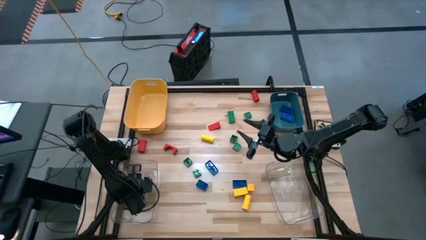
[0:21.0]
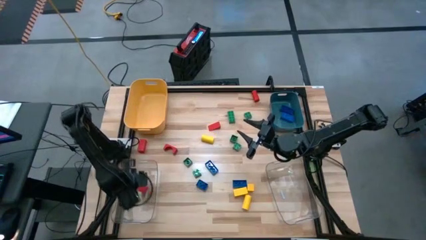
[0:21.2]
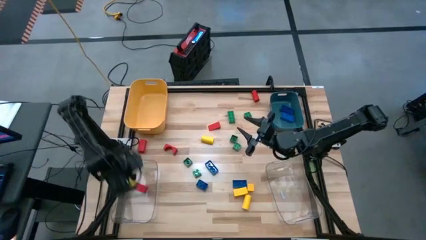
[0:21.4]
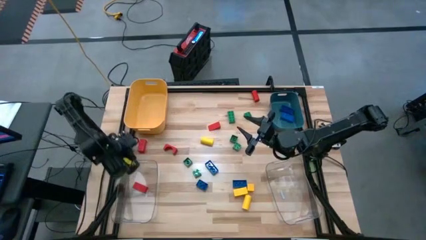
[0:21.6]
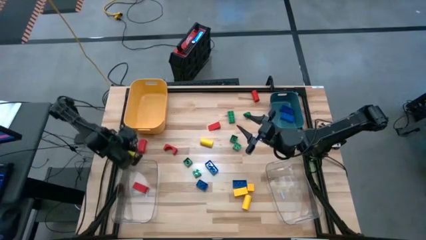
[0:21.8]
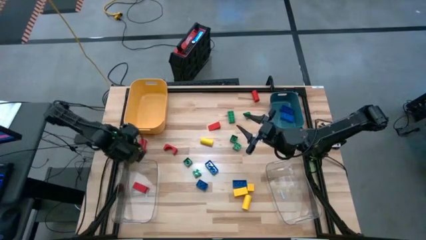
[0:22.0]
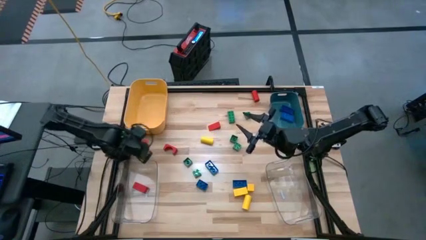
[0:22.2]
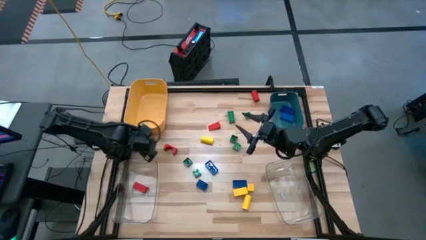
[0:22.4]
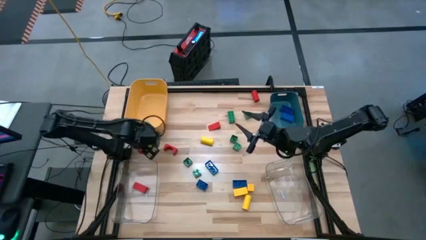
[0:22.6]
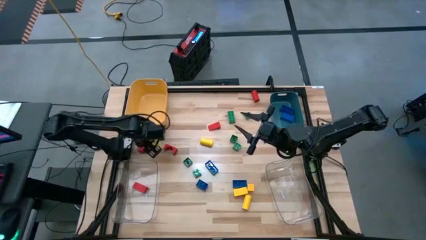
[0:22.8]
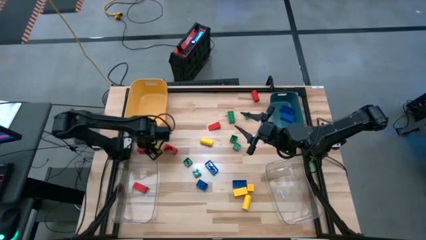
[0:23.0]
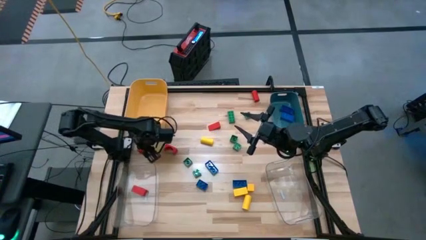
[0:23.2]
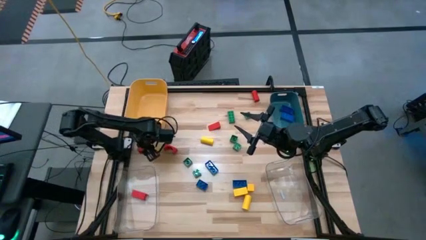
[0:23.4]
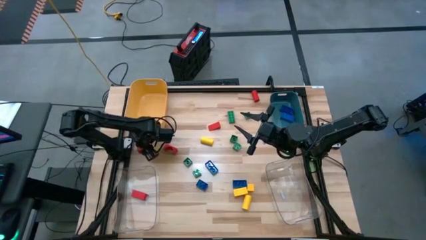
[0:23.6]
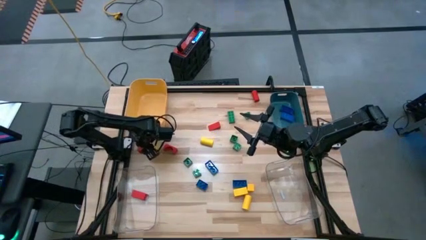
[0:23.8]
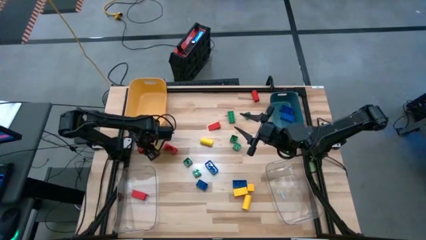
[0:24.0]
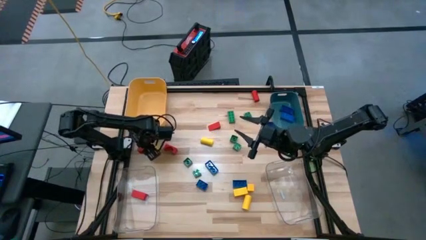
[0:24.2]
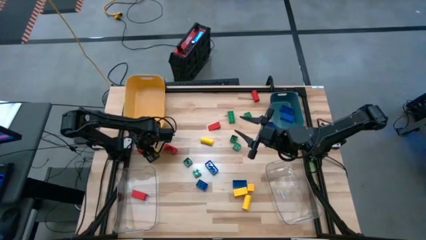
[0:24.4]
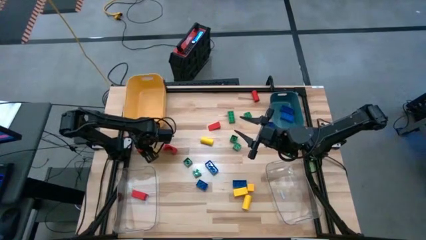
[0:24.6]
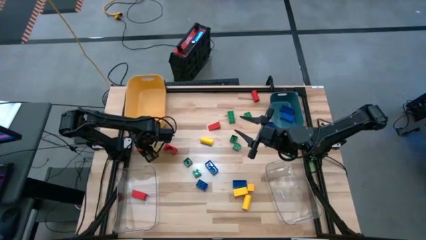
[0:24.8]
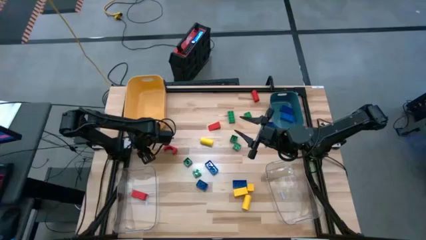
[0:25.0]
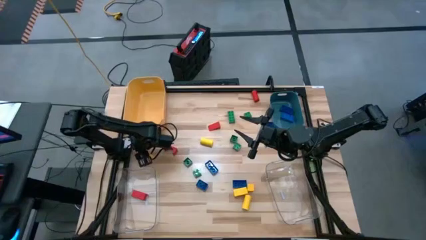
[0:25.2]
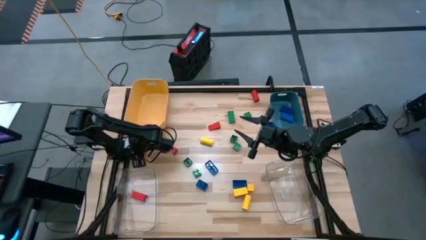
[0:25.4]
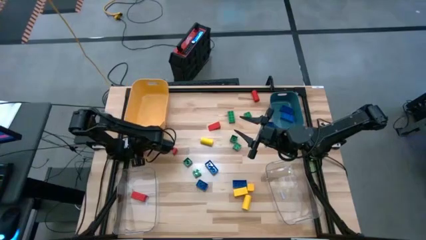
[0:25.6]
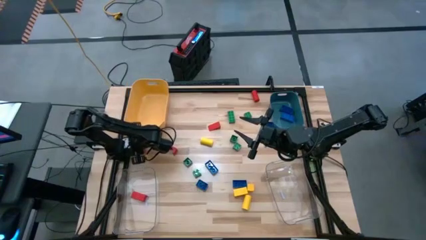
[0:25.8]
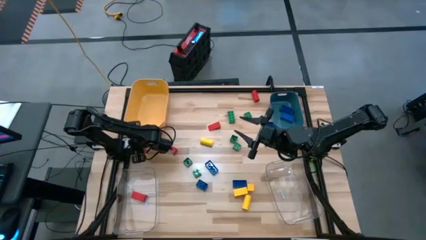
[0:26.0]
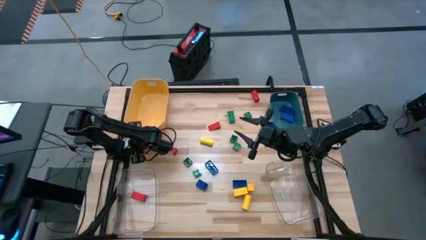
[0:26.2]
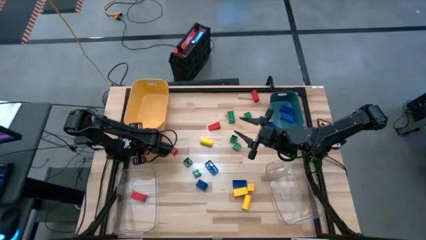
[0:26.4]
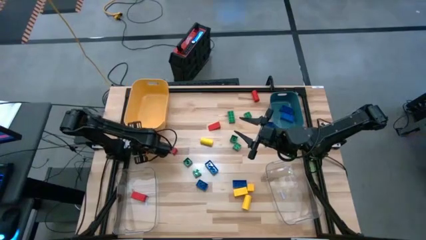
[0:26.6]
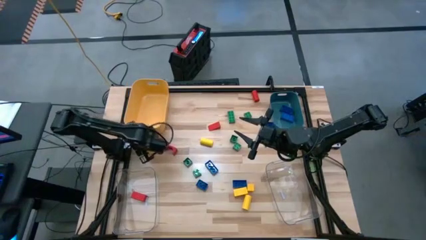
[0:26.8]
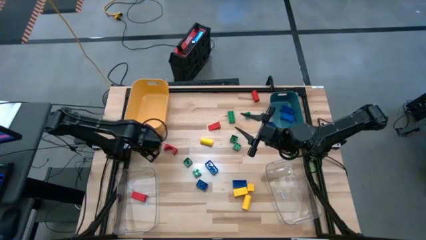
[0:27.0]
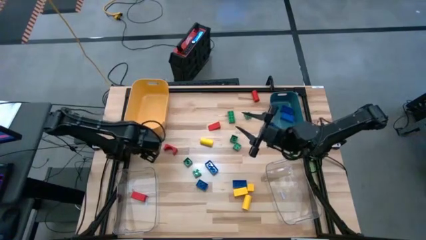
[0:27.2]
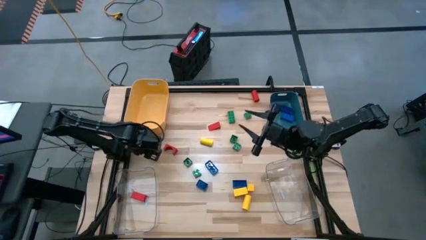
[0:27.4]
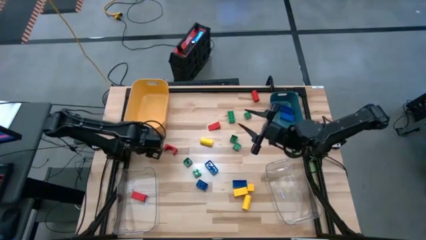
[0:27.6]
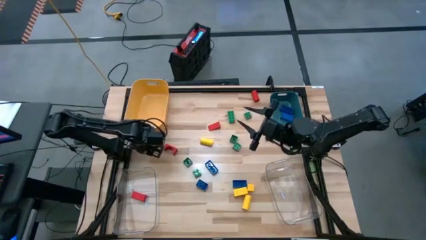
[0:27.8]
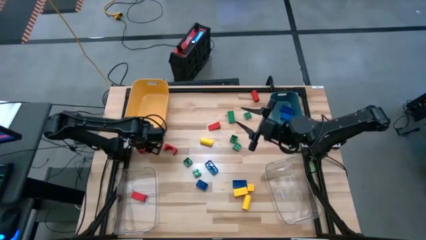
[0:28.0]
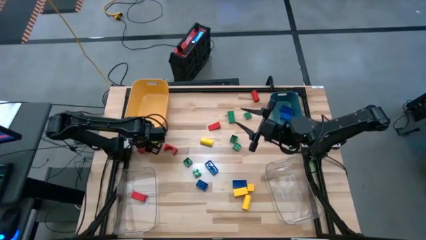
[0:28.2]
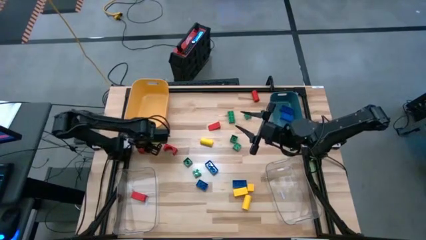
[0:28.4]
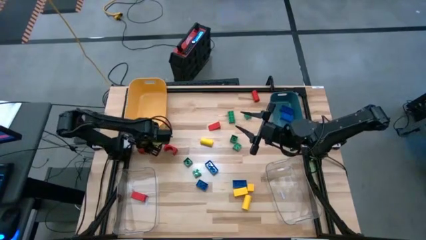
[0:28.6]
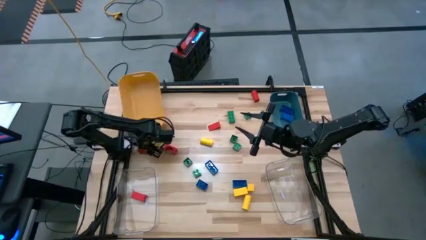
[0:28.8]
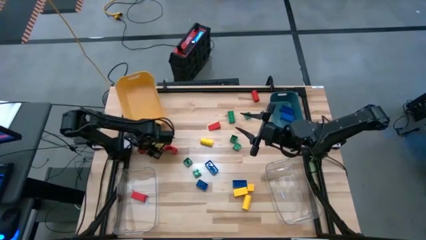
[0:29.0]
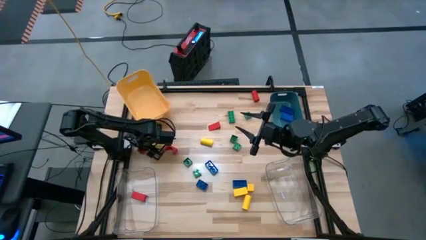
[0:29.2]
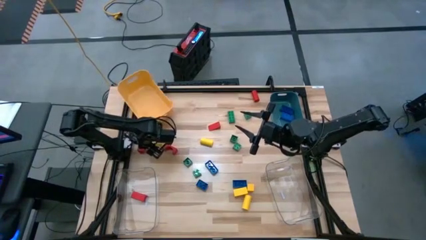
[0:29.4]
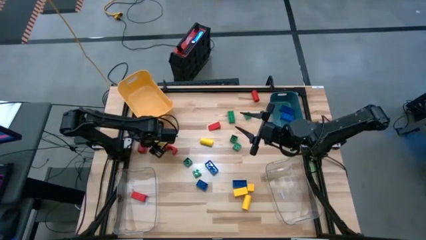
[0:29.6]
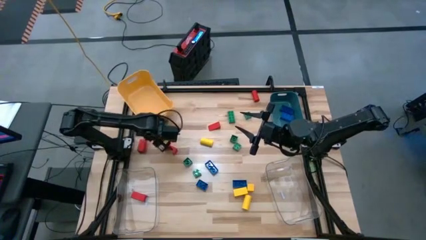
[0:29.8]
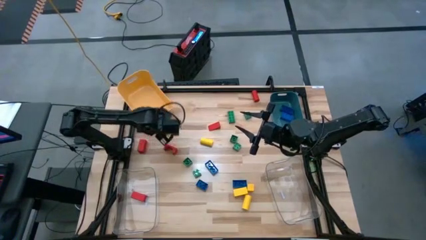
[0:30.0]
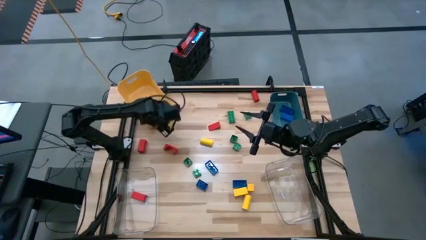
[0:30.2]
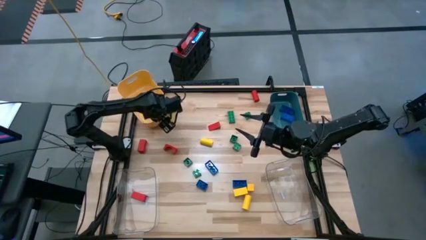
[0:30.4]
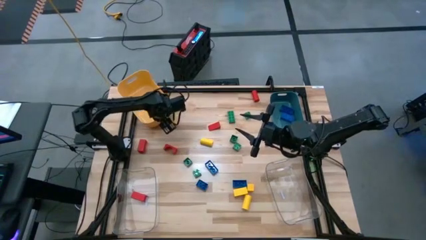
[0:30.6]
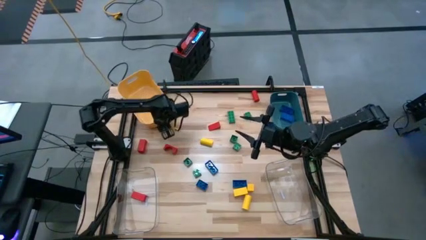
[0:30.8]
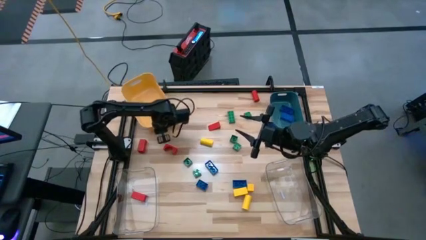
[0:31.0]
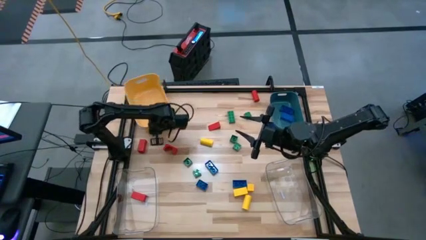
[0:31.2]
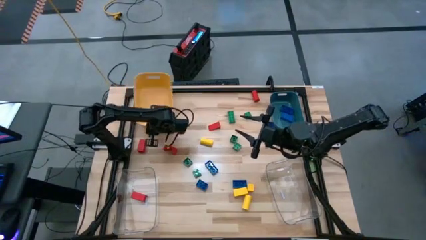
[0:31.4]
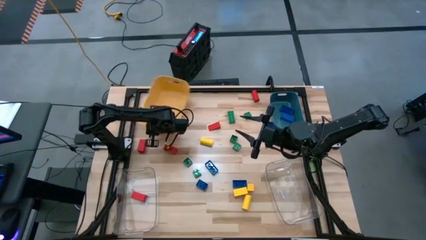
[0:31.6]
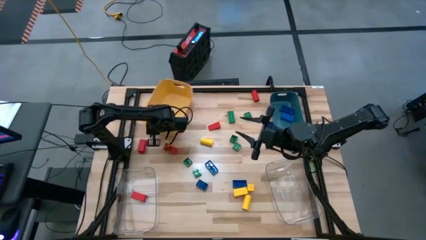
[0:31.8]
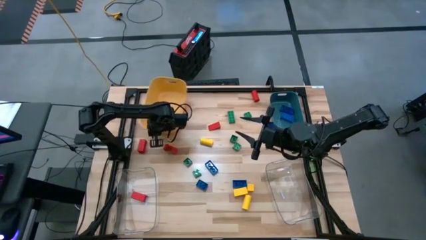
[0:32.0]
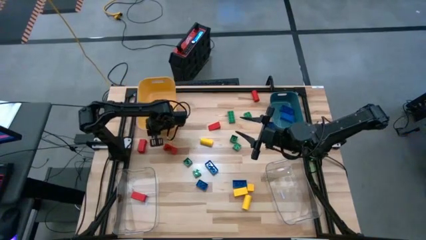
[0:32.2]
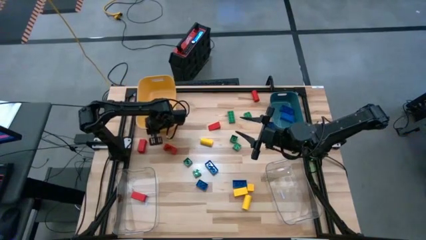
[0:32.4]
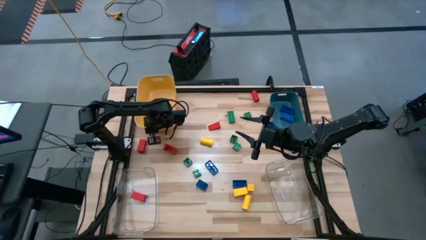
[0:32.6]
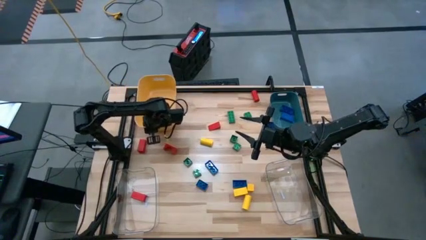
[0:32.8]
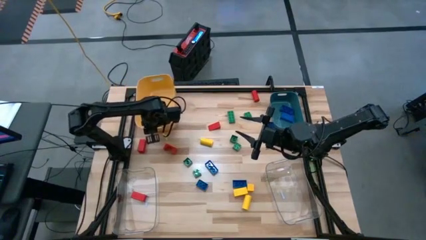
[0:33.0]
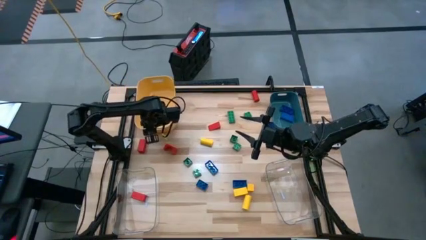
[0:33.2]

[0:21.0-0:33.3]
Task: Sort blocks
Adjust the yellow bin

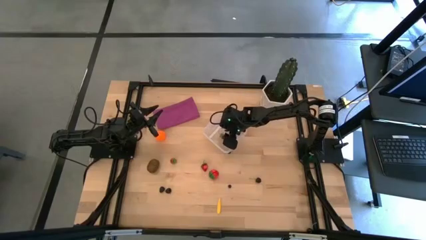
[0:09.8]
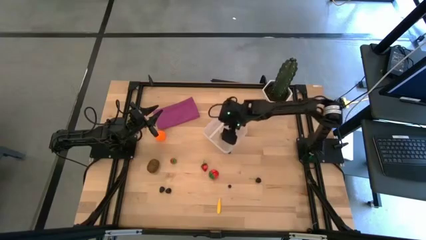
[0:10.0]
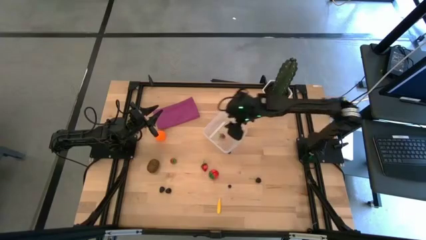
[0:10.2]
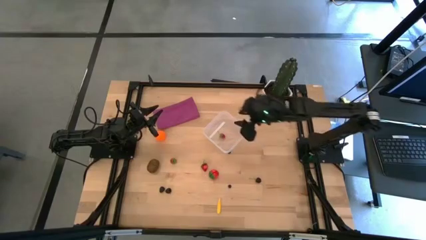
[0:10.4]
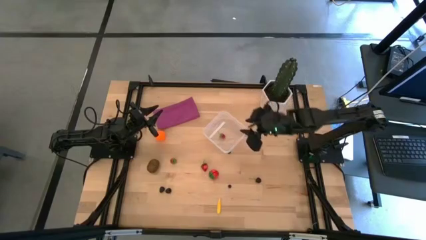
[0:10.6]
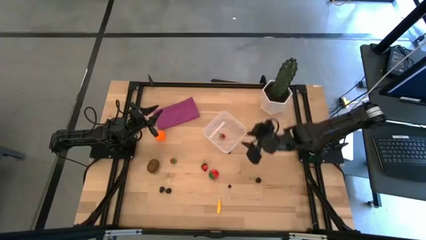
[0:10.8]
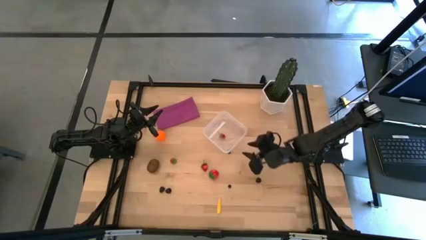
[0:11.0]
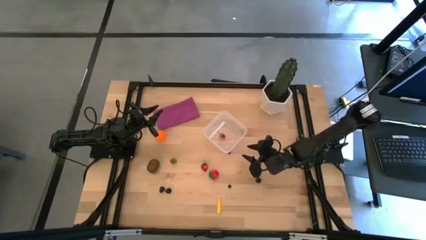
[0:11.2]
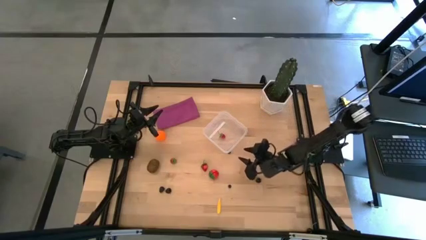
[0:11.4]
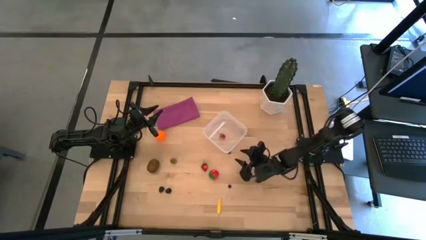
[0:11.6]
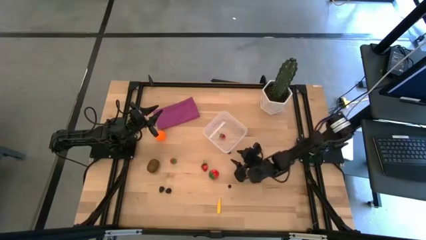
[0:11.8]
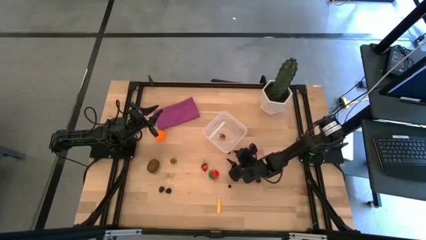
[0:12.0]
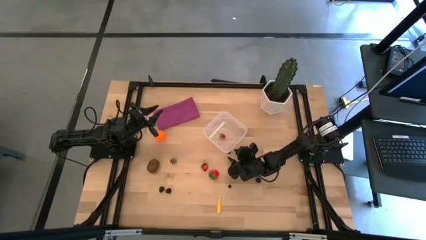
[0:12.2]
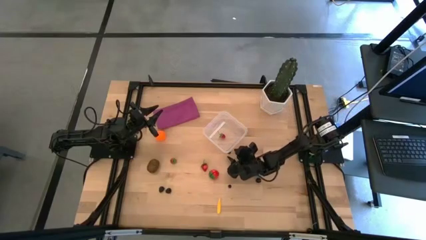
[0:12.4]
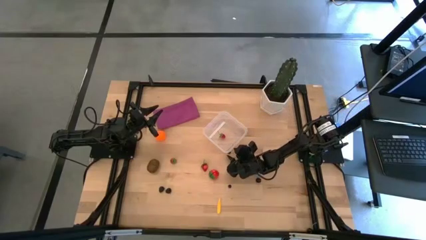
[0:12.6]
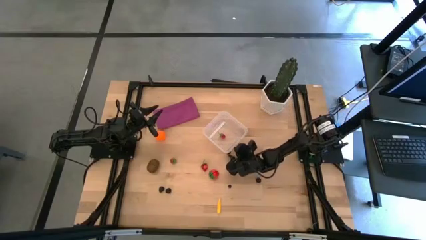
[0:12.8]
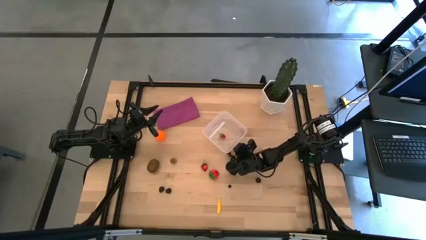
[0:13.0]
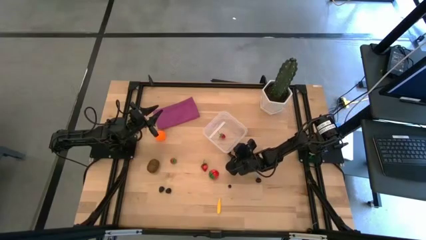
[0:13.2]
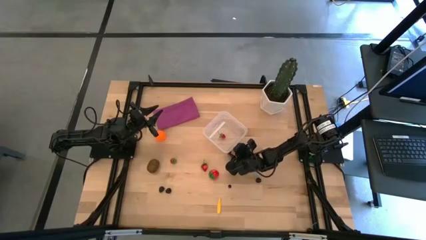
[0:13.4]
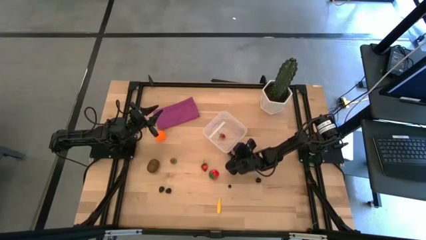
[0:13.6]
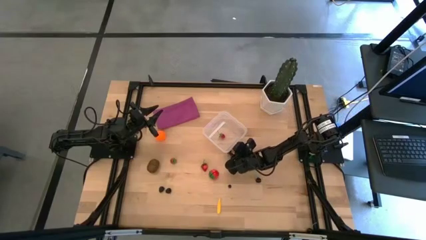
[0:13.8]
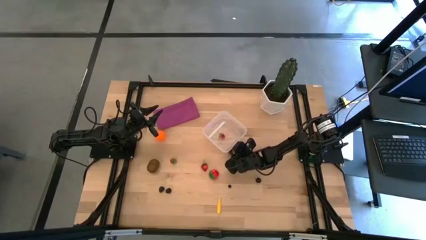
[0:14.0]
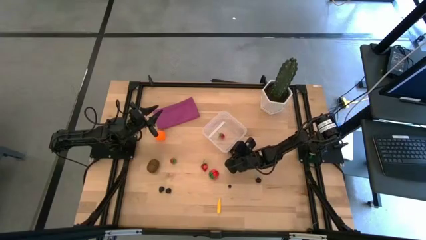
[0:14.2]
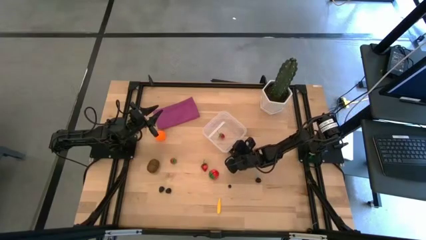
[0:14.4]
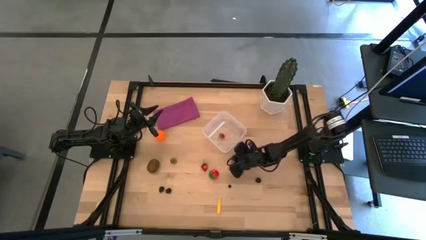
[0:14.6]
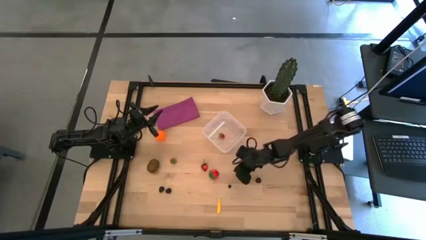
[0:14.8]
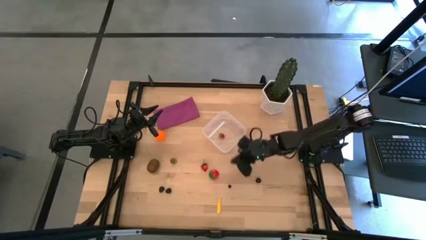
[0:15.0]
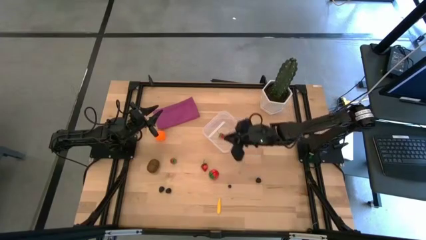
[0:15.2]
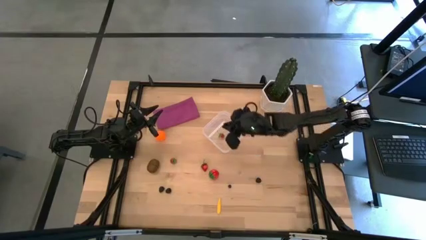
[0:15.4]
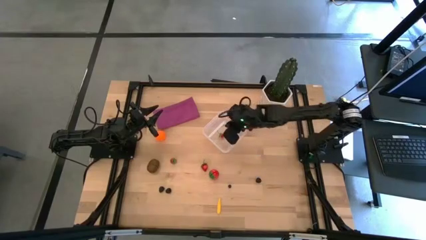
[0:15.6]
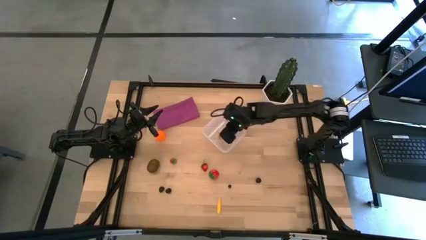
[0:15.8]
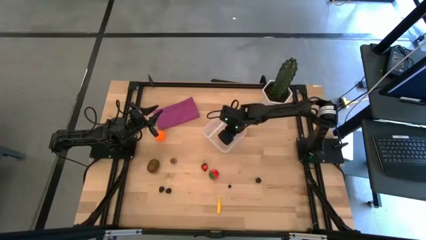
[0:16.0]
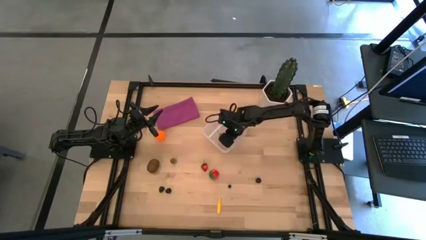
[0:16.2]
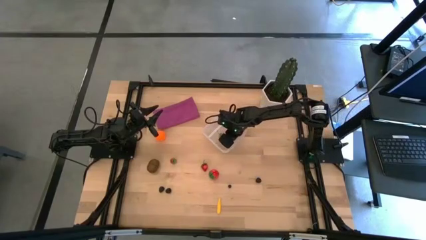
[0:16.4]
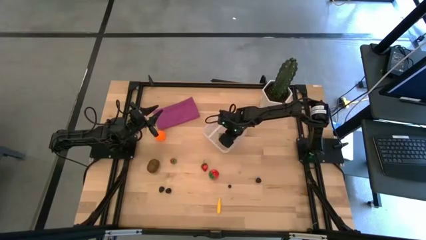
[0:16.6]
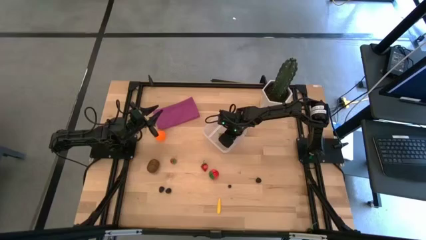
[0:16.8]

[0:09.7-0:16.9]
Task: Pick and placing Produce into tupperware
Put the top blueberry into the transparent container
